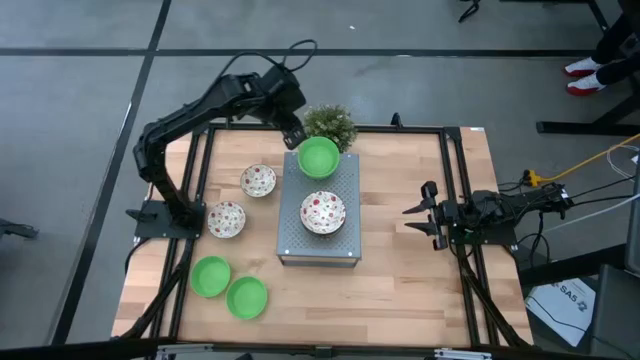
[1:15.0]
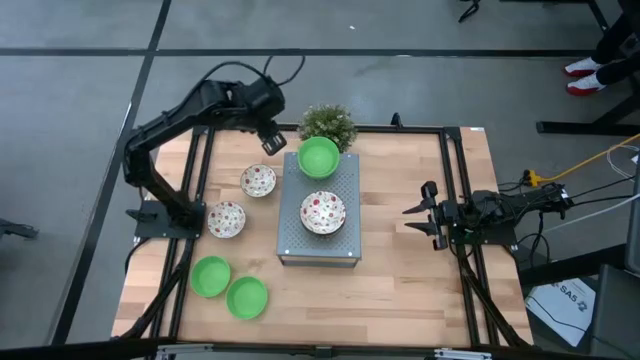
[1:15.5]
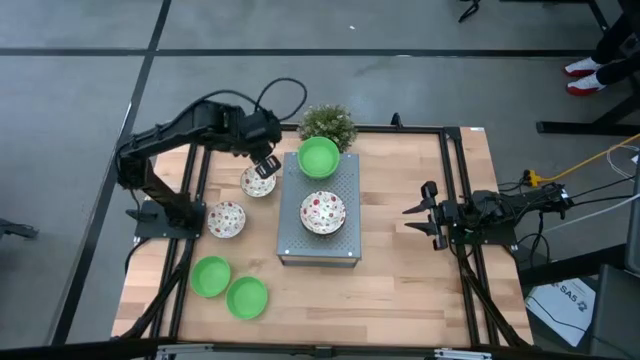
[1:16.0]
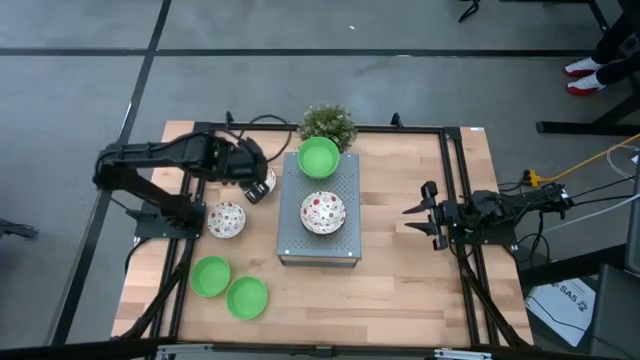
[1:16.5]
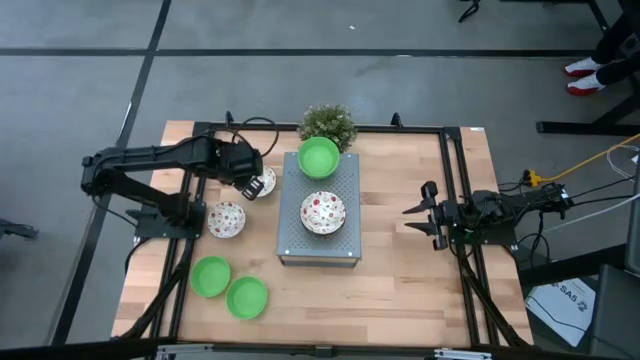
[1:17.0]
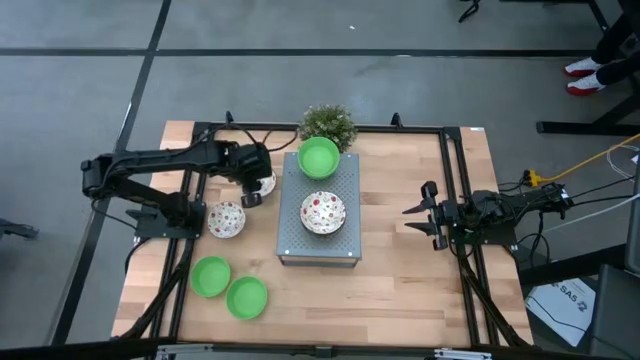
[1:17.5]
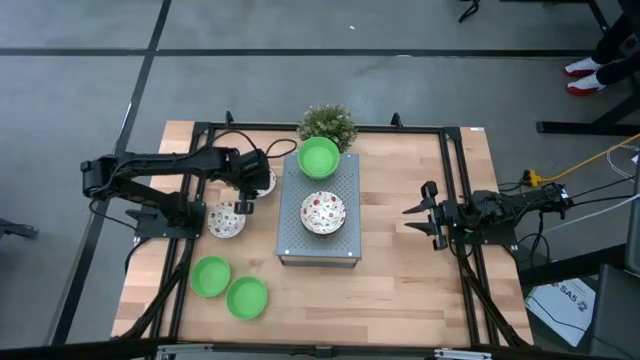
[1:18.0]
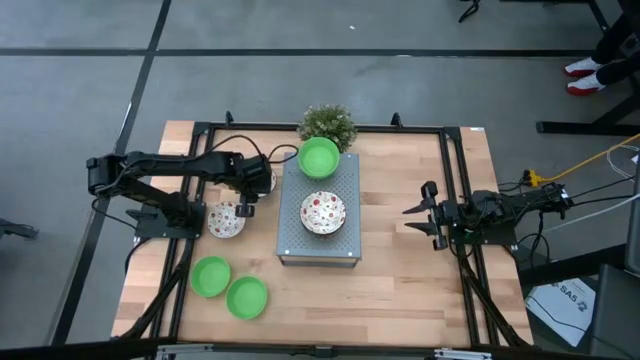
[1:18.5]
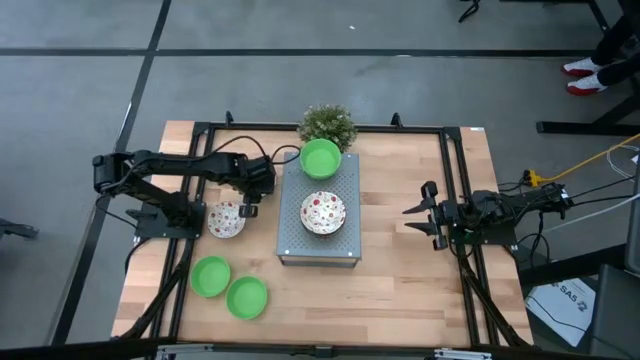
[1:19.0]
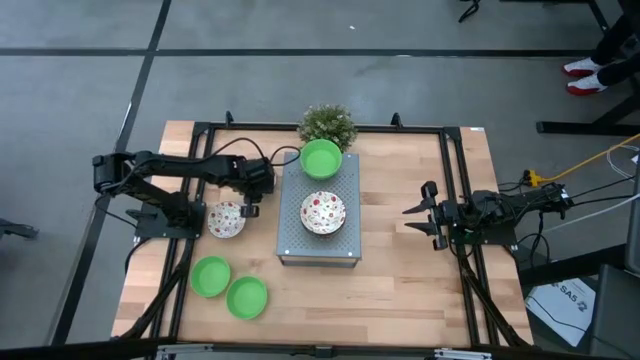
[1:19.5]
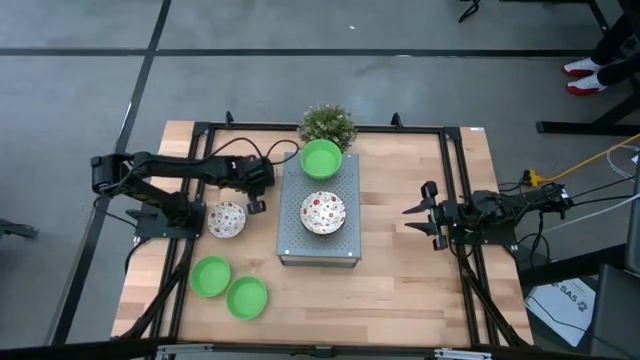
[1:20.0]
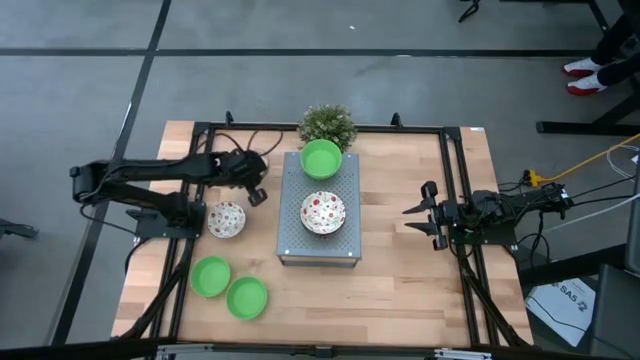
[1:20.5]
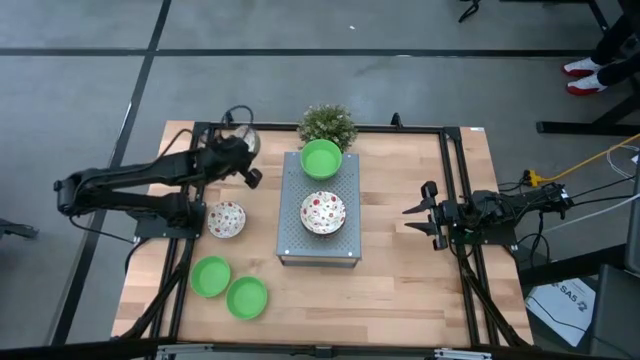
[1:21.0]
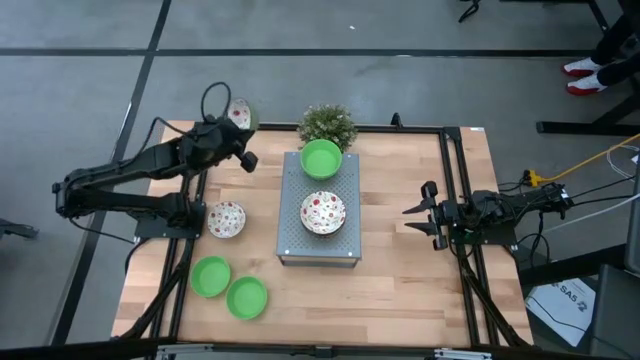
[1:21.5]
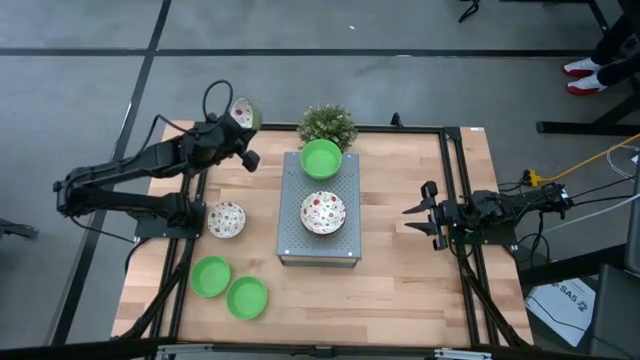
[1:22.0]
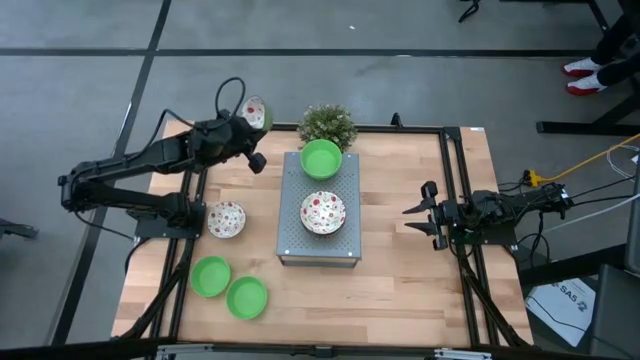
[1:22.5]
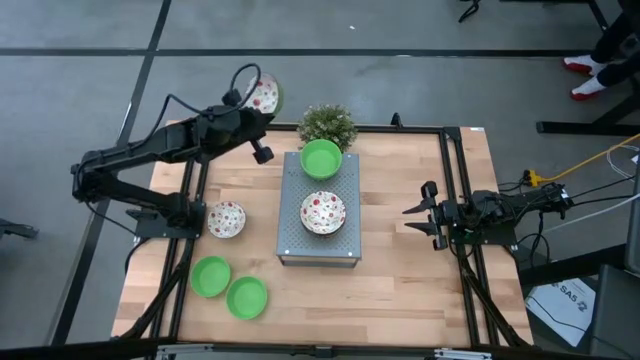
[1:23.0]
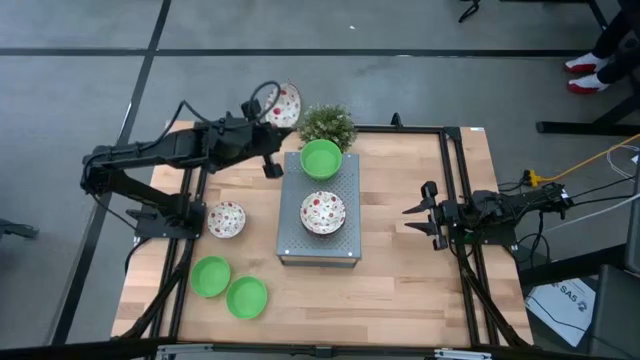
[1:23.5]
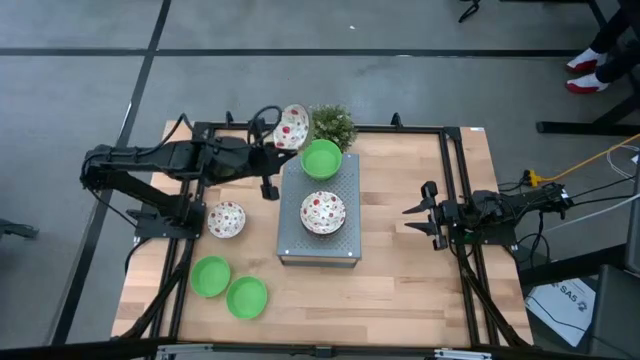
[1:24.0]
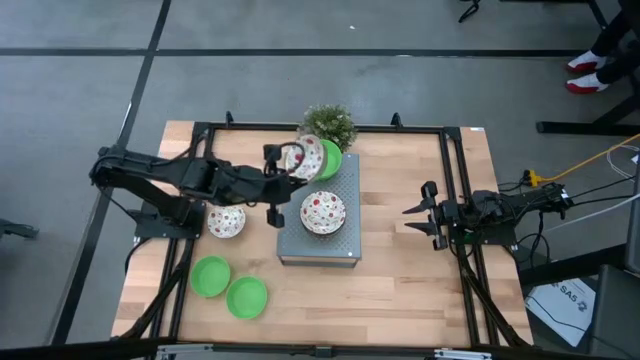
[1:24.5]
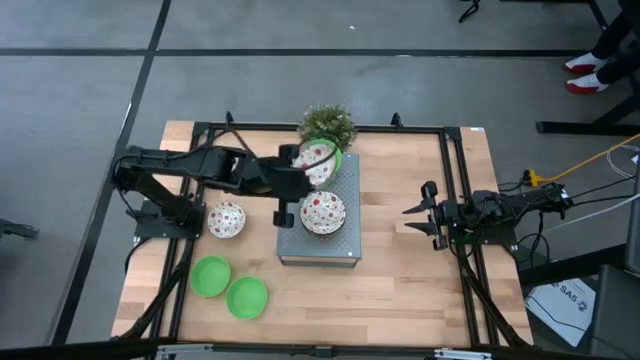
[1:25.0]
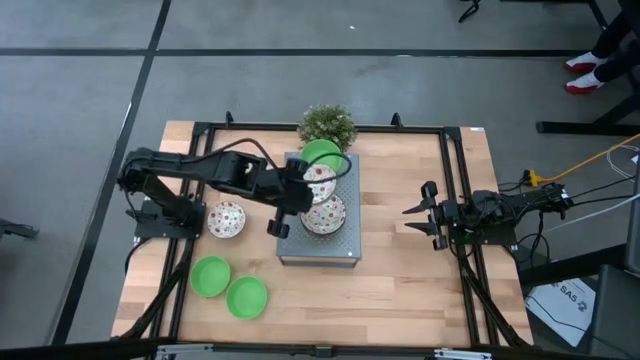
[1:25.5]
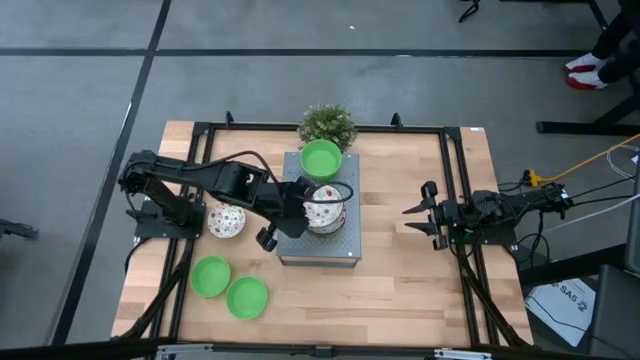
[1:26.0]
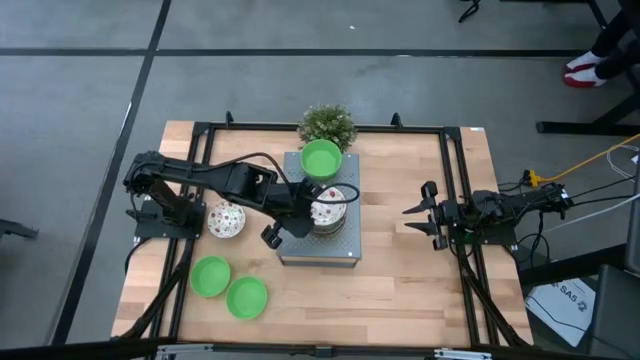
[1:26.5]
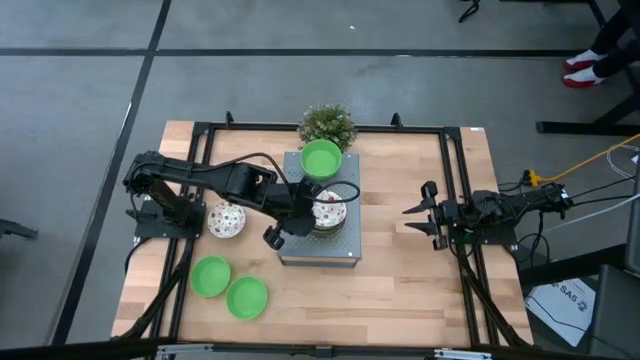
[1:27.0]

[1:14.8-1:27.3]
Task: Pick & Place Mini bowls
Stack the red patterned bowl on the red patterned bowl on the shelf

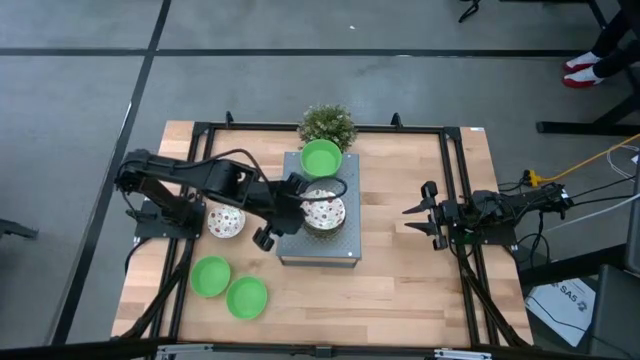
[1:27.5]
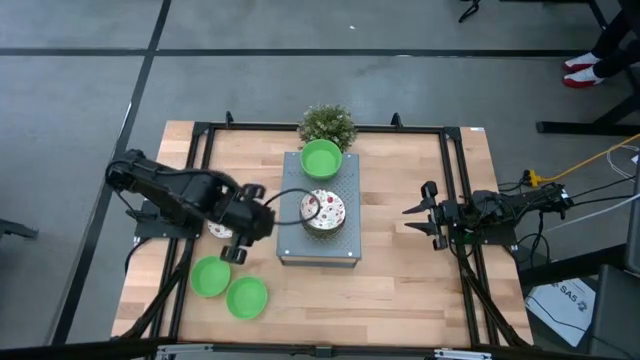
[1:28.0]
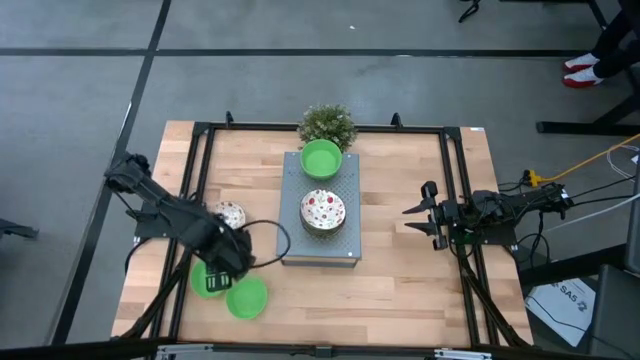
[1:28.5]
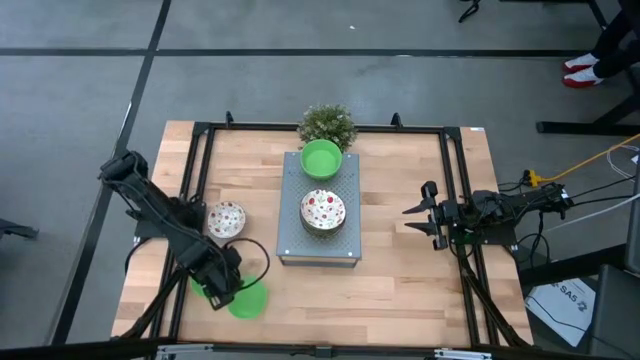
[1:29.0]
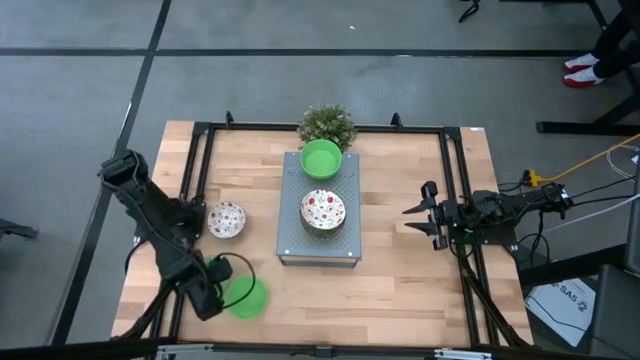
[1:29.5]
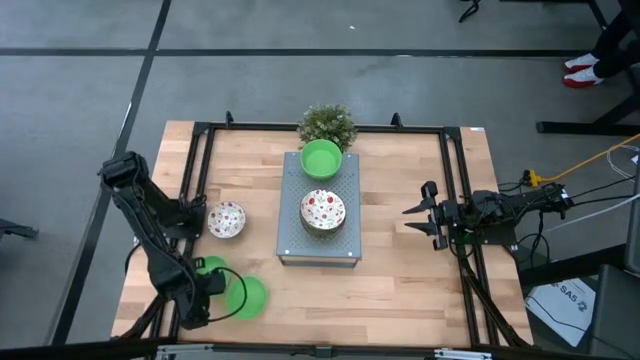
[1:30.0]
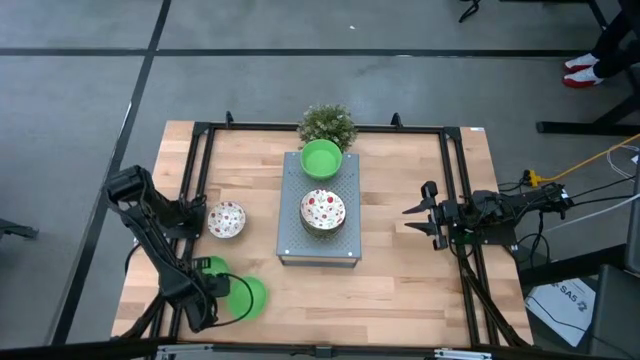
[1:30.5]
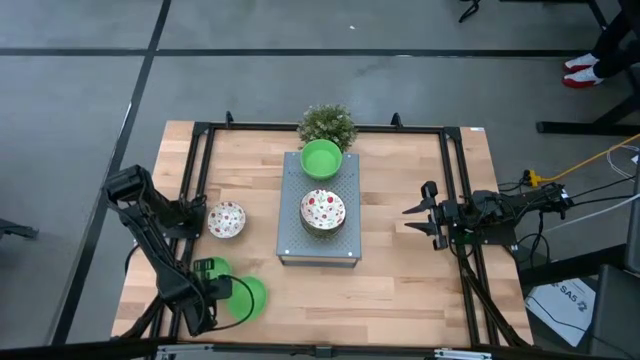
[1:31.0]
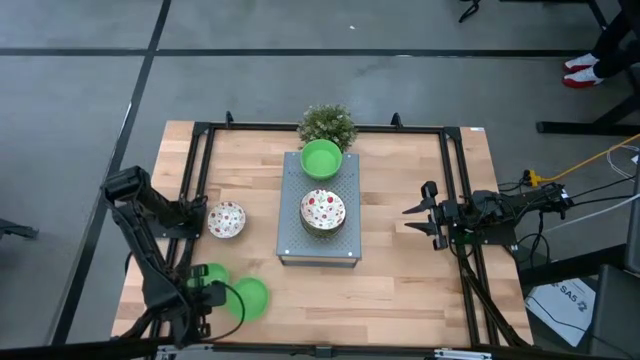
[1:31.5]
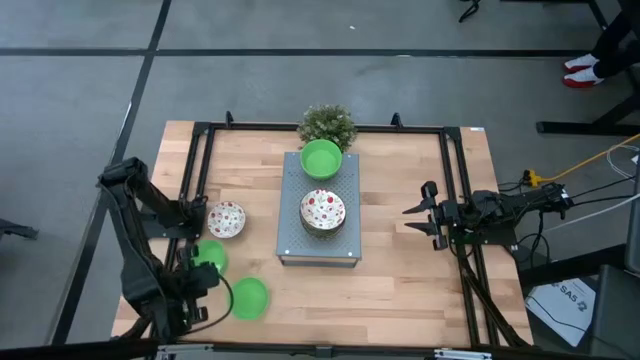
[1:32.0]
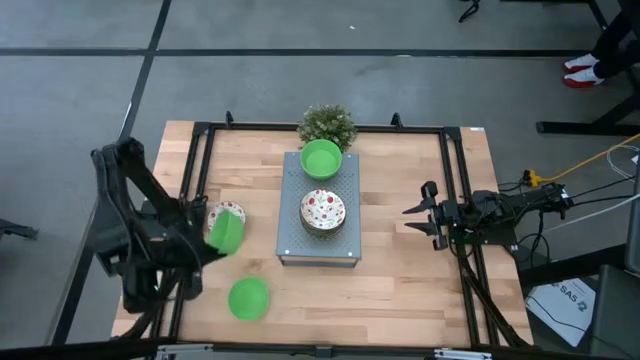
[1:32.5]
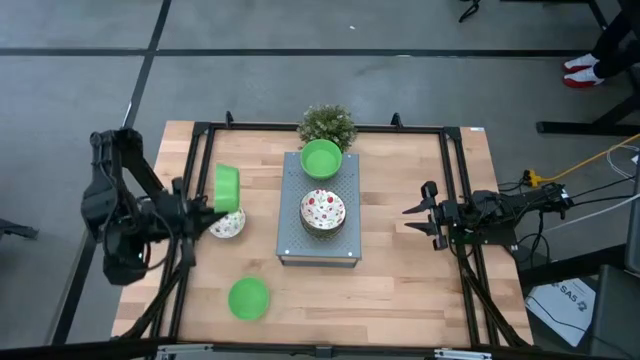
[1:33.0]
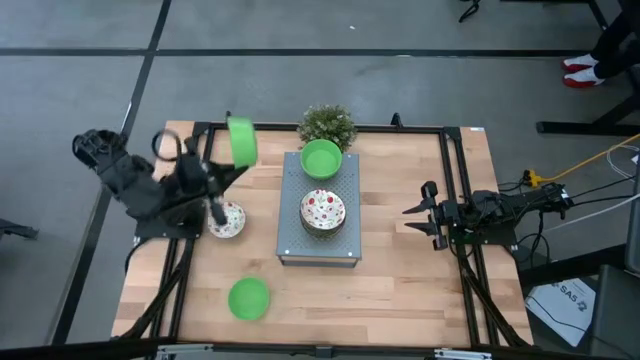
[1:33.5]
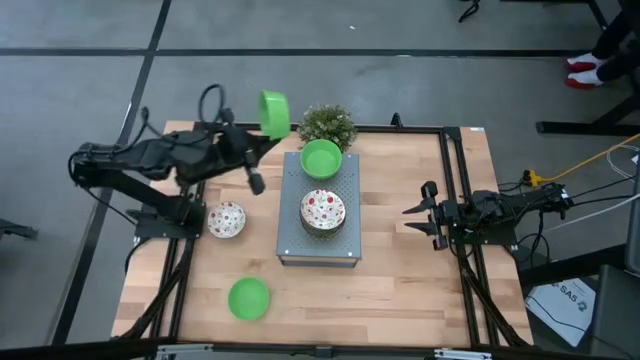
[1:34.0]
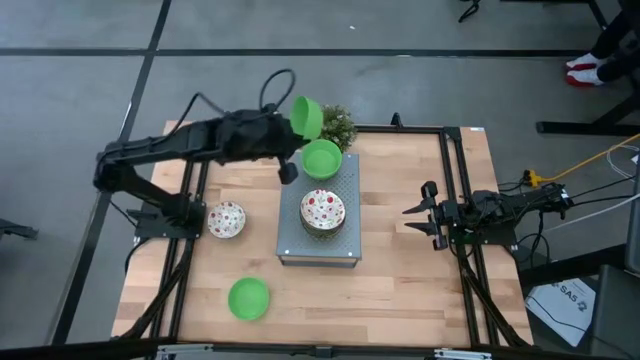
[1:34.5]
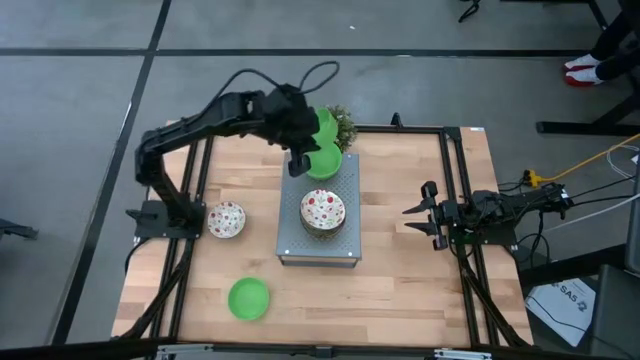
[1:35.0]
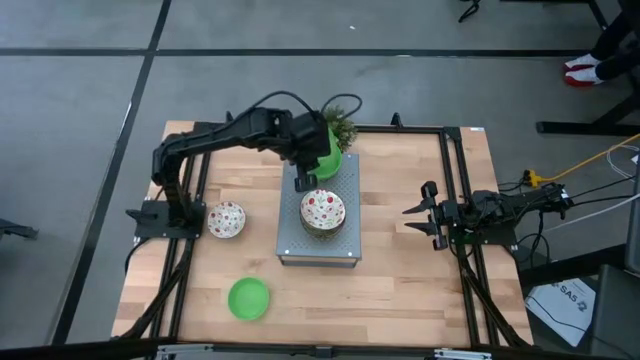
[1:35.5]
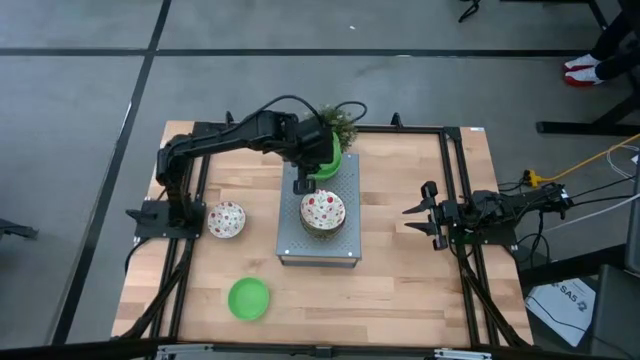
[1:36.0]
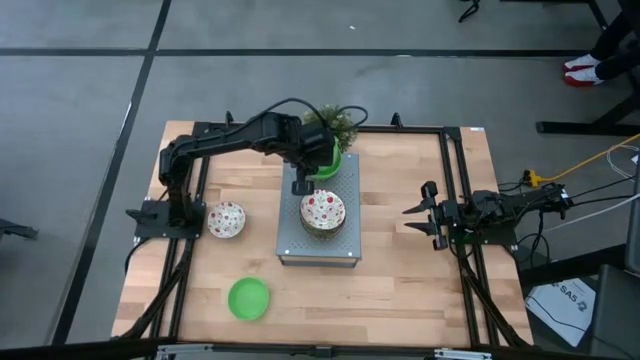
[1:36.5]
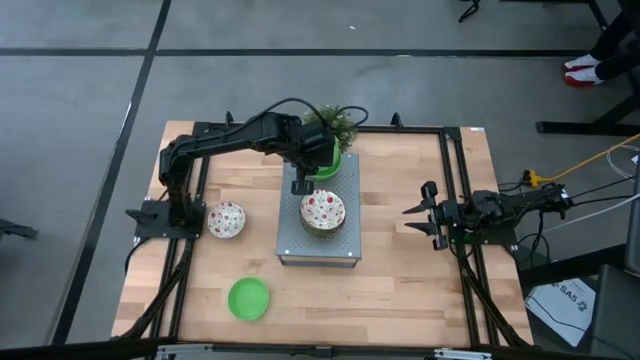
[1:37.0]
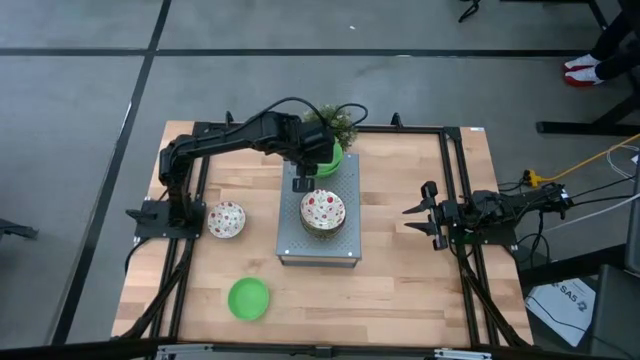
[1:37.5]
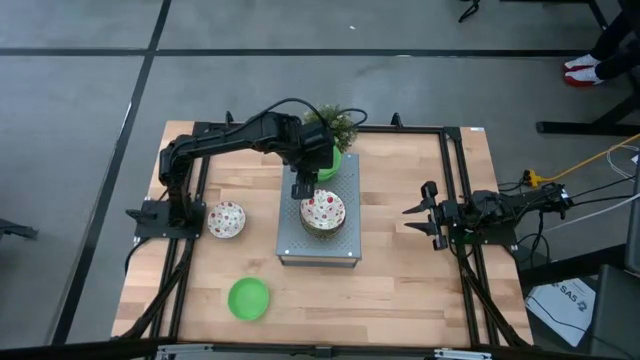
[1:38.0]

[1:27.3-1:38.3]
Stack the green bowl on the green bowl on the shelf
